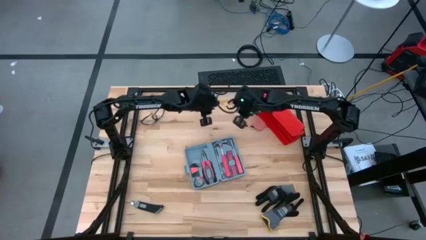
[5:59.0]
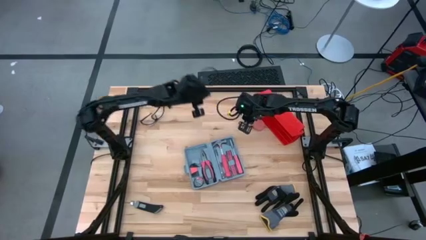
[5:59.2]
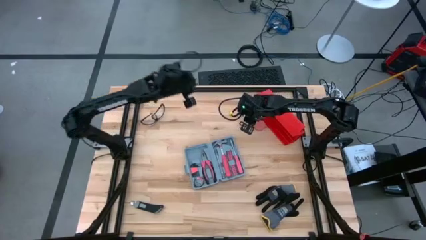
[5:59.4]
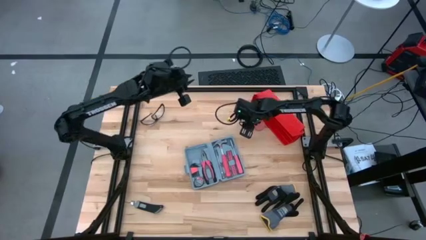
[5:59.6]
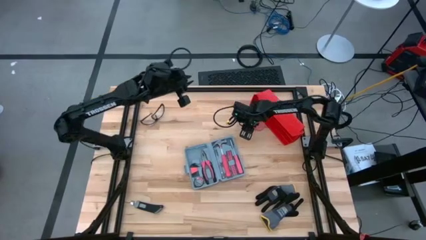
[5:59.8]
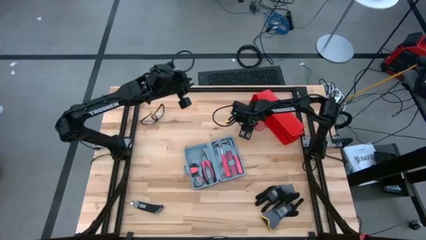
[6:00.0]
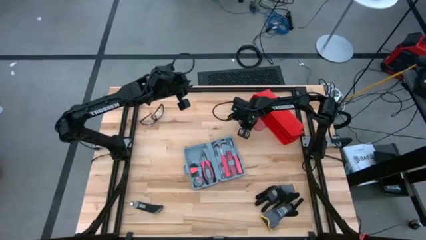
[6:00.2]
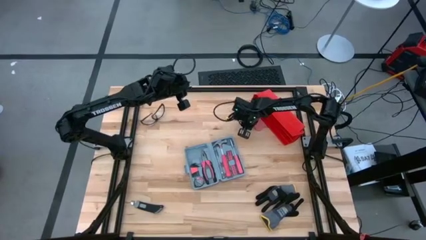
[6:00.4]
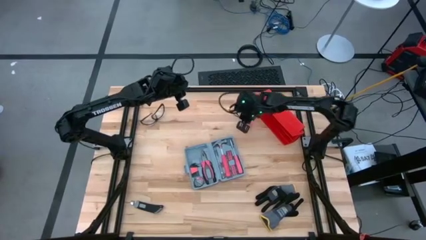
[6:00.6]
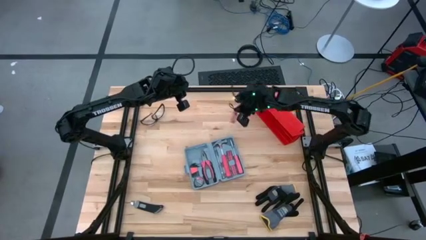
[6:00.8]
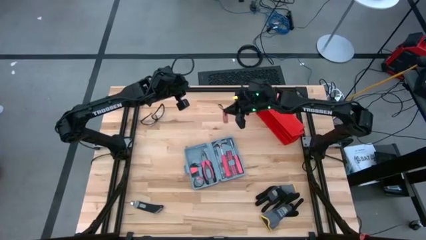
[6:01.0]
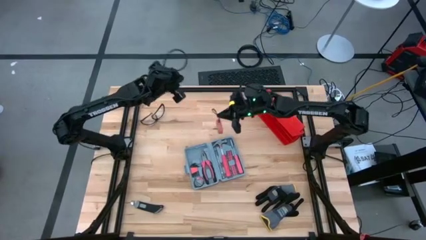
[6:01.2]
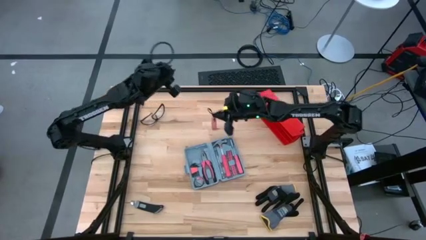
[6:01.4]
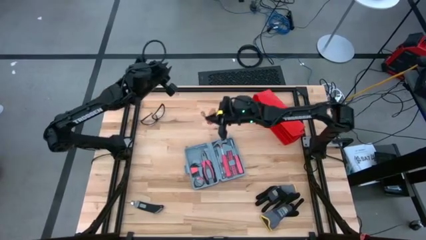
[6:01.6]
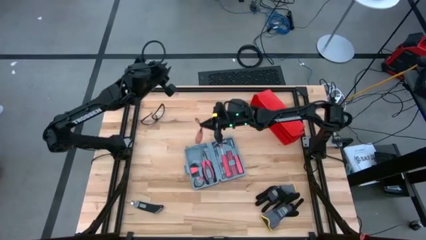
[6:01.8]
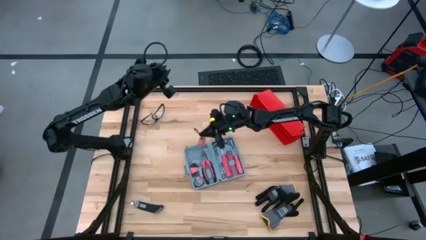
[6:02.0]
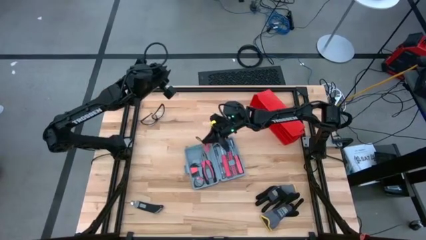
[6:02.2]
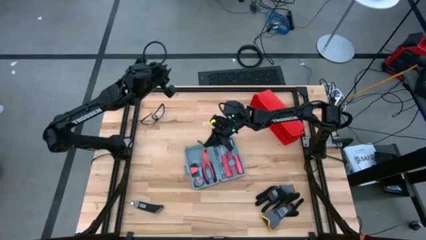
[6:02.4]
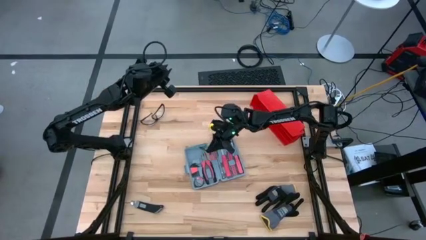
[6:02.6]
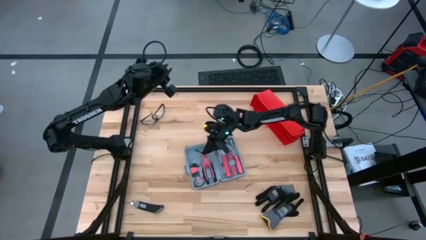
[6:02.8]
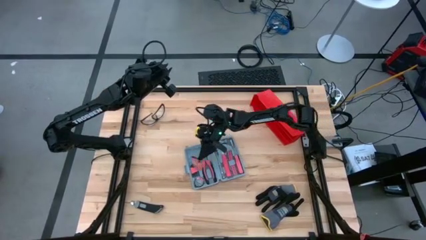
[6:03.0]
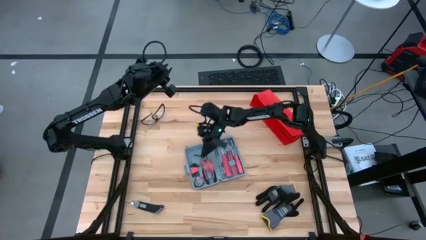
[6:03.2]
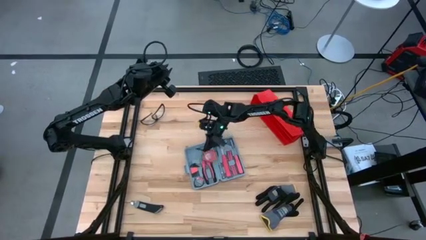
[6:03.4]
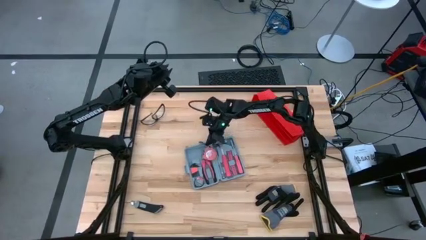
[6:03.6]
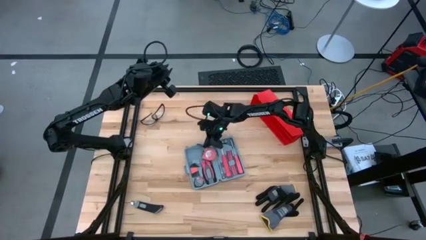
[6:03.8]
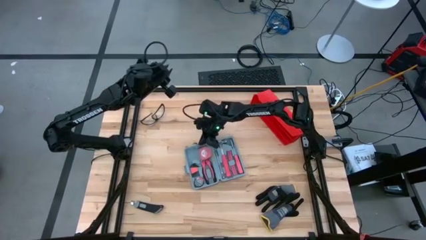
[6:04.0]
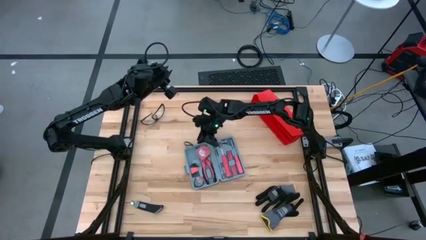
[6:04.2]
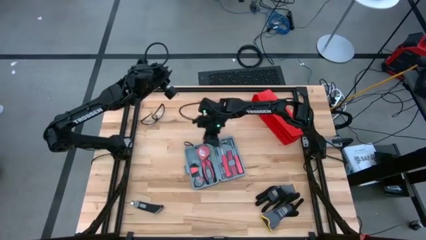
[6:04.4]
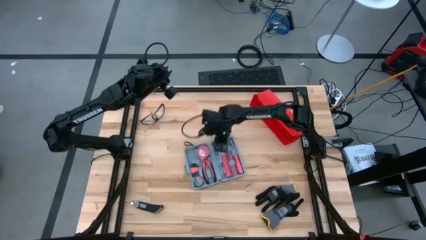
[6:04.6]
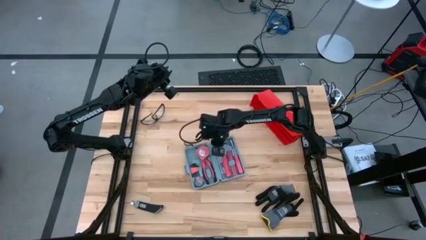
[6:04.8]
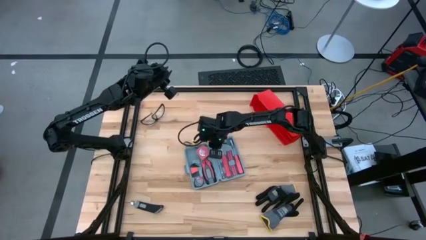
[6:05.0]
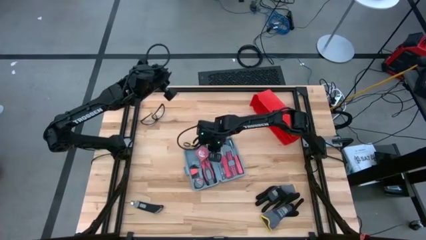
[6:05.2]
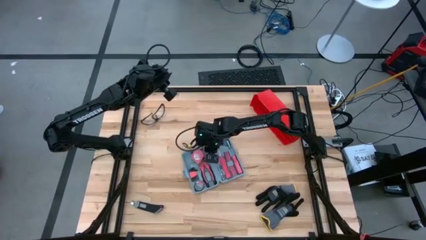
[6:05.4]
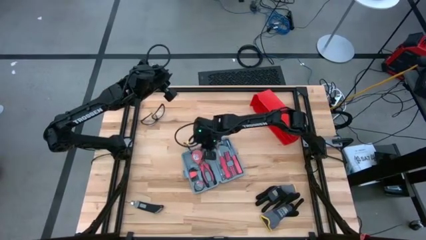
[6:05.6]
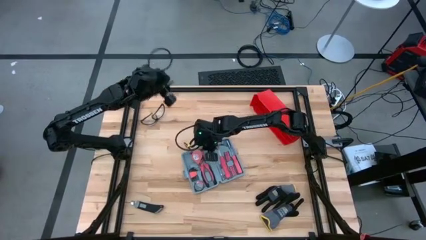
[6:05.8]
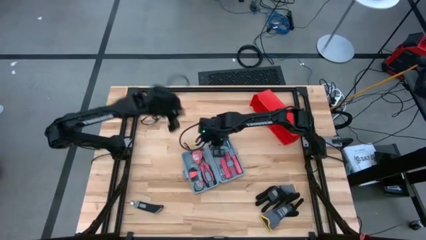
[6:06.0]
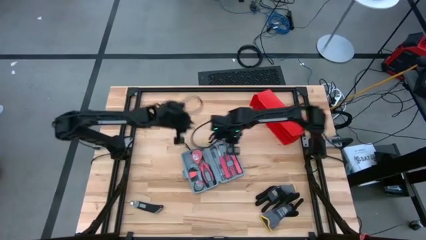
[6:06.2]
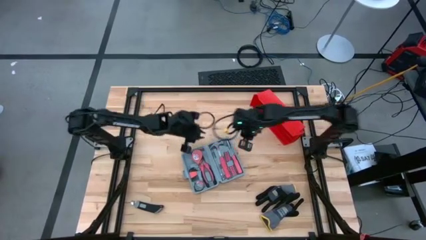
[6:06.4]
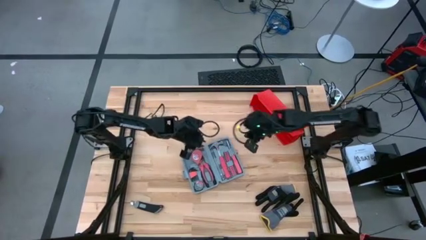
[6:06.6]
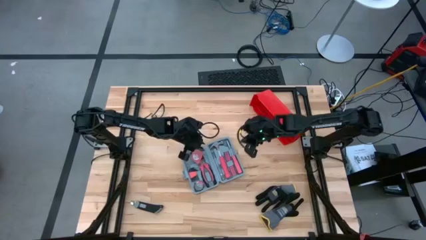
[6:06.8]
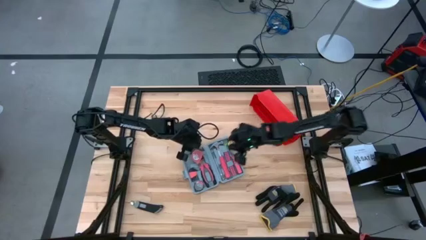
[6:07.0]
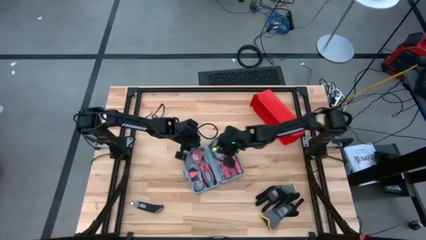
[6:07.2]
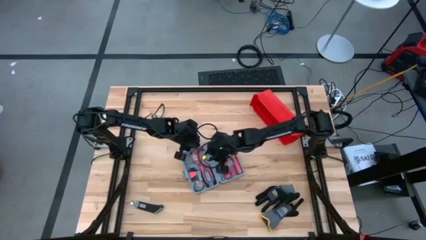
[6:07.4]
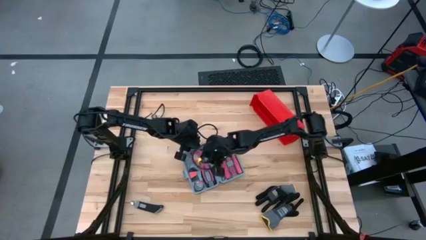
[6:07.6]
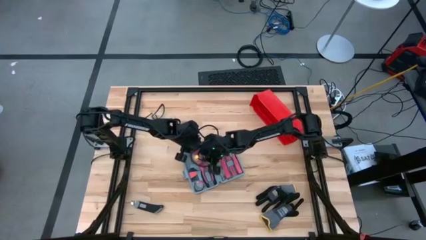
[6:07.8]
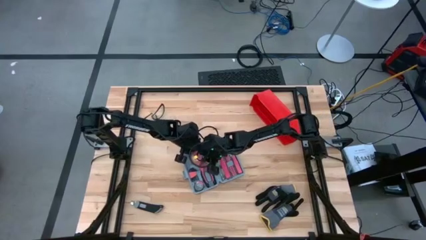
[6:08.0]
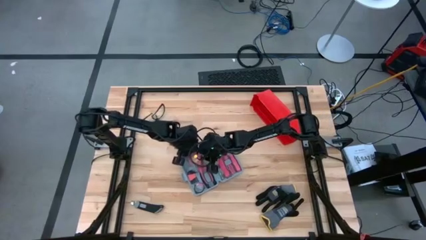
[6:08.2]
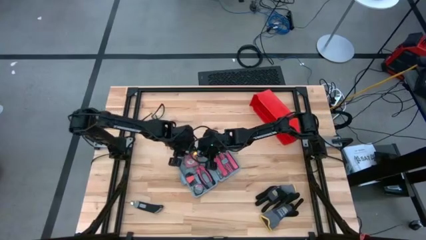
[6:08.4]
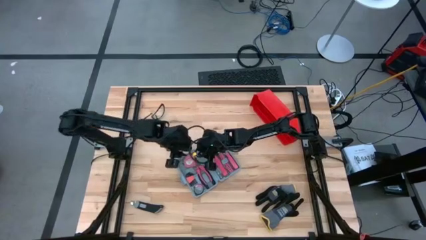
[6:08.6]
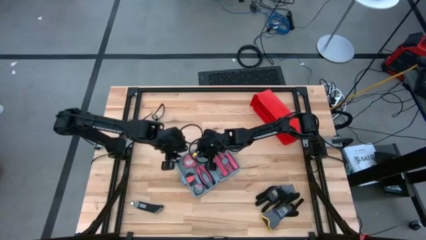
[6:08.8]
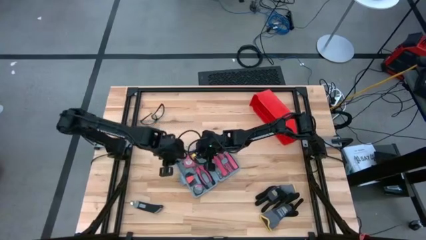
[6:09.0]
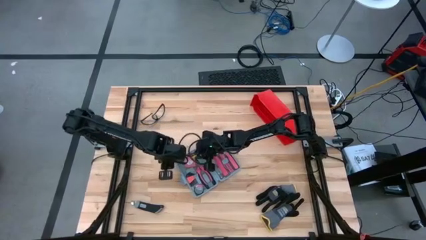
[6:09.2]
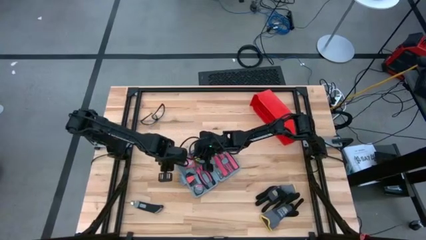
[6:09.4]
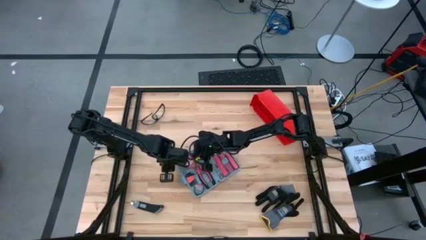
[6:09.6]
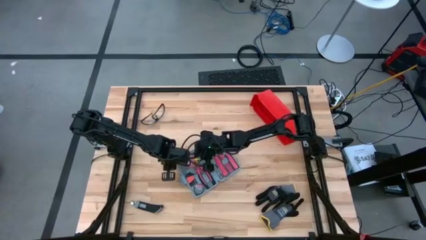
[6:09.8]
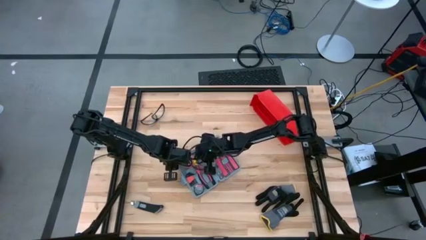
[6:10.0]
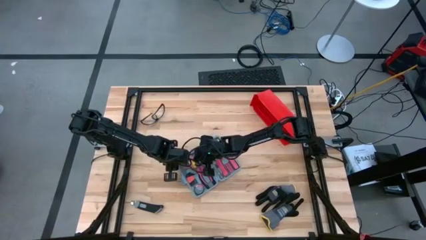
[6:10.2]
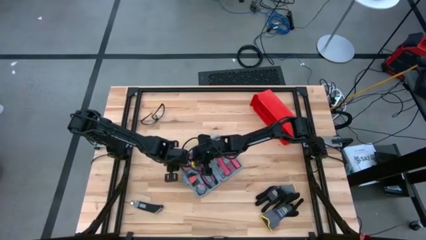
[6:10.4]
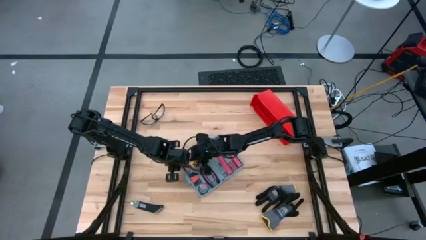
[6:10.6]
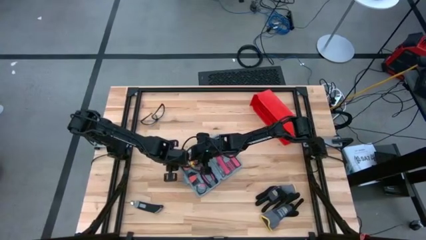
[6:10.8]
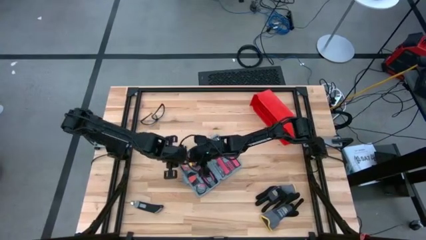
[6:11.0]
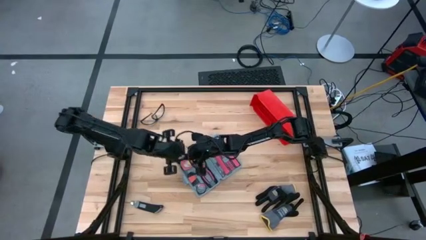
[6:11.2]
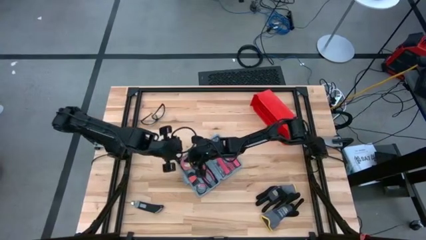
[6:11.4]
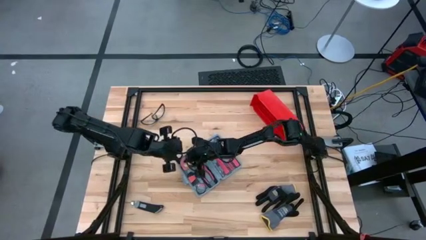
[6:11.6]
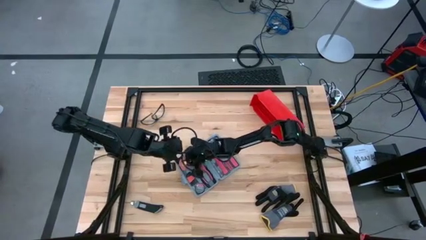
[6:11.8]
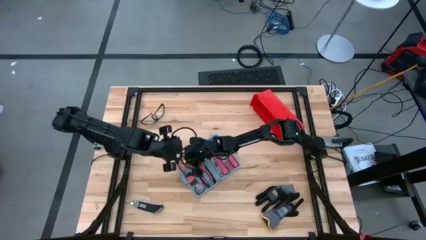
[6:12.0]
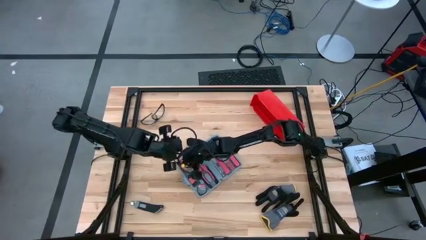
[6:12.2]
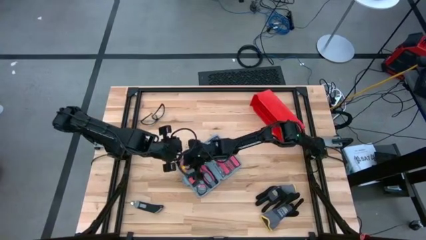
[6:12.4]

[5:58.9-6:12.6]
Task: prefit tool cases
Put the tape measure into the toolbox

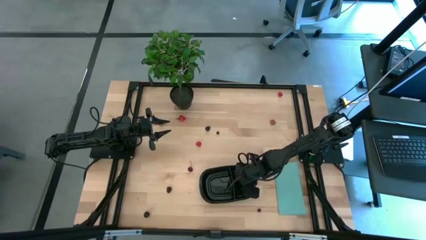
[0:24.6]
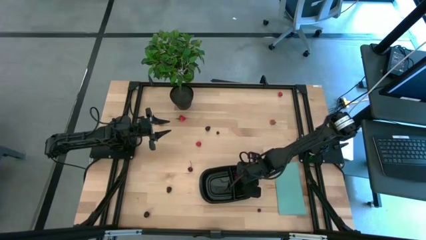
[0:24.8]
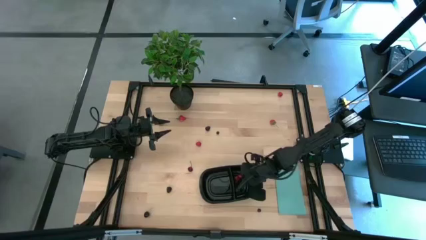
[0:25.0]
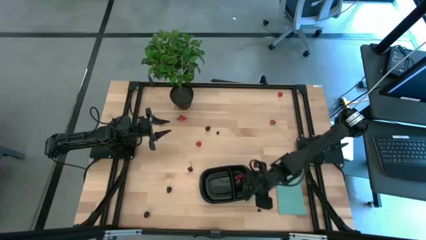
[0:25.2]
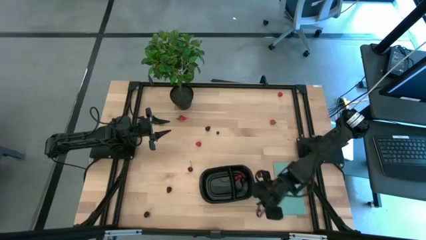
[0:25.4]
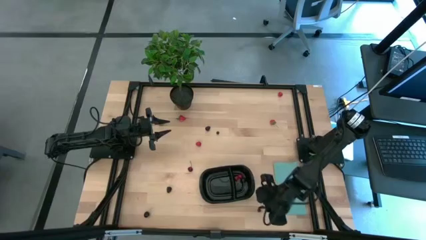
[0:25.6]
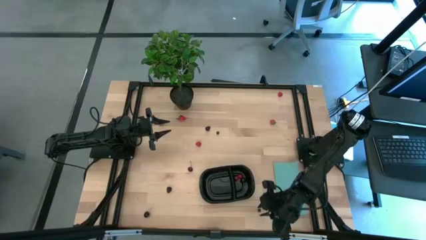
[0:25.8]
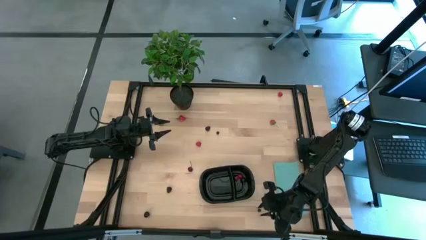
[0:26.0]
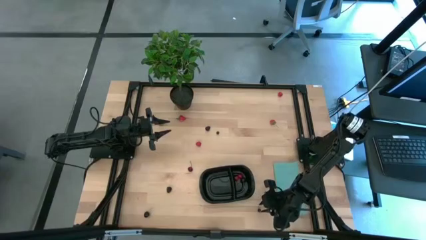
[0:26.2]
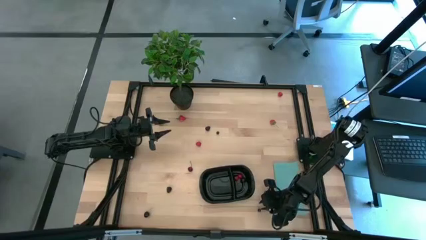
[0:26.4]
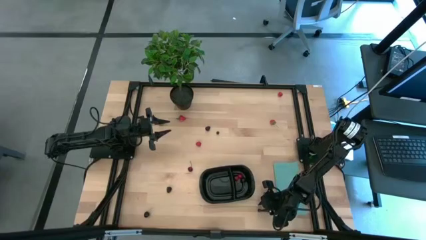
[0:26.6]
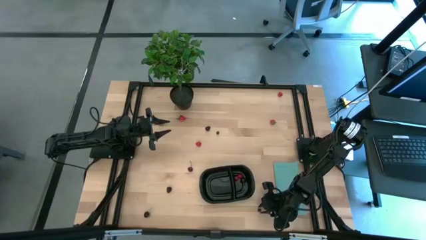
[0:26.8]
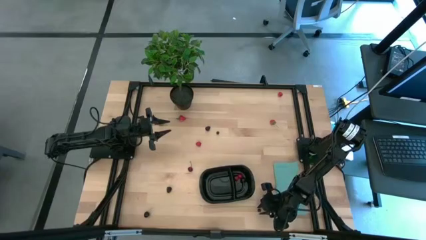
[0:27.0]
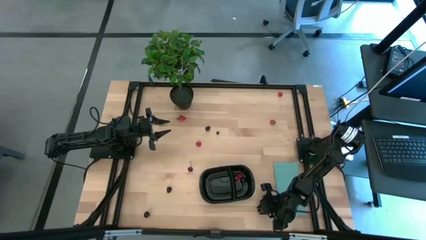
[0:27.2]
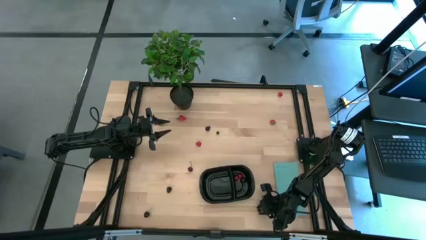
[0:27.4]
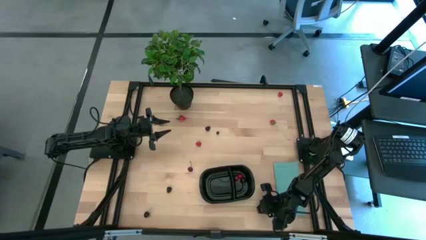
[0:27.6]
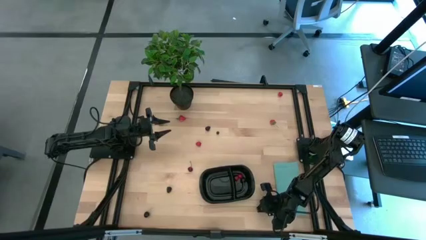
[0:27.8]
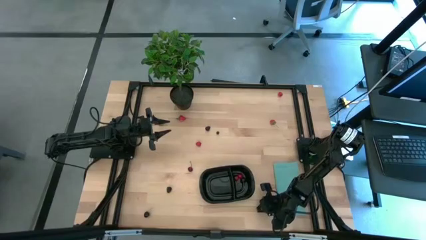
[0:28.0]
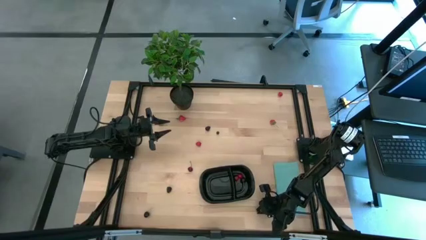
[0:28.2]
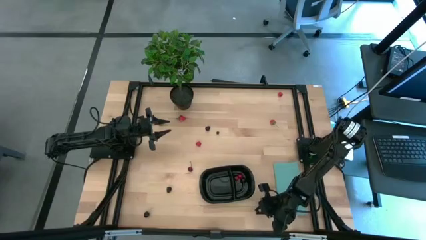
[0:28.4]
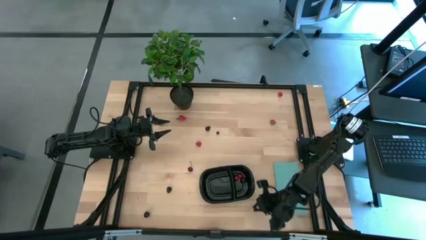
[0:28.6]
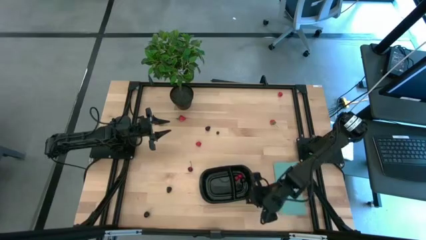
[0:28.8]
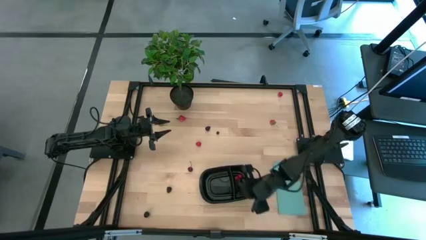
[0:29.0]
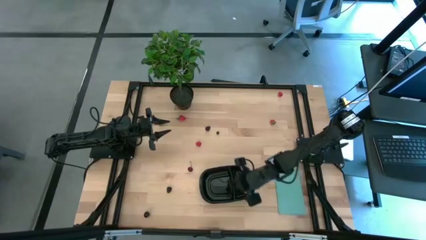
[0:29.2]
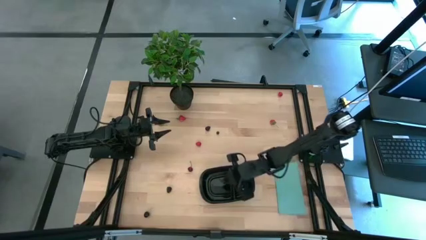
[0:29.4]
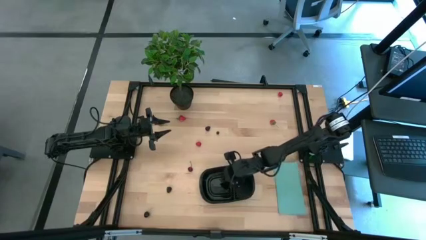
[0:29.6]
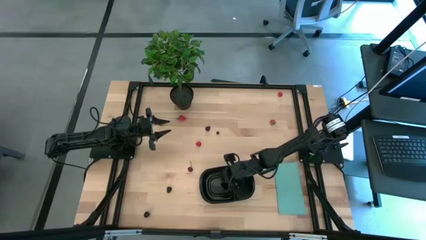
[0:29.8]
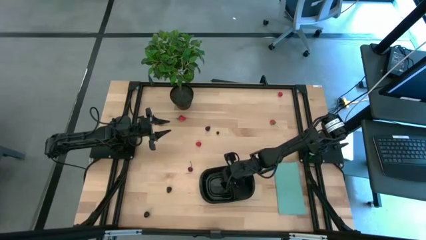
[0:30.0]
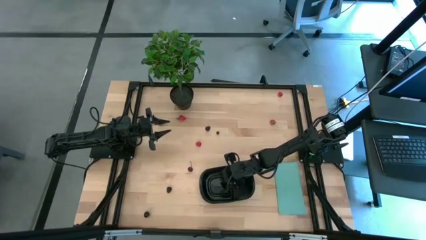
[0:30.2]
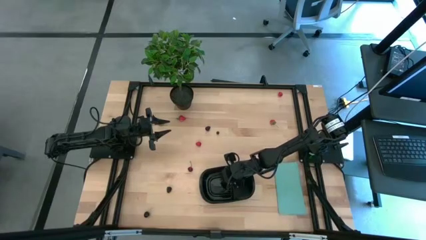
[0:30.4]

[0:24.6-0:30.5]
Task: Pick and placing Produce into tupperware
Put the right blueberry into the left side of the black container
